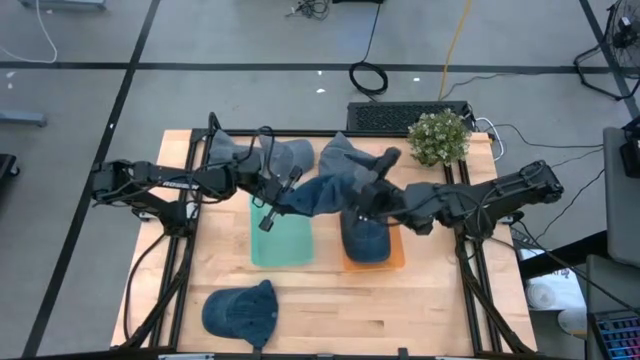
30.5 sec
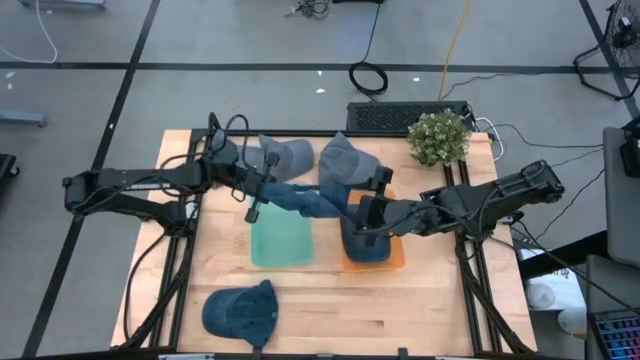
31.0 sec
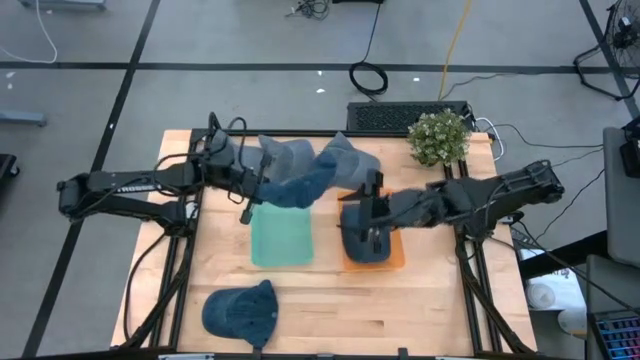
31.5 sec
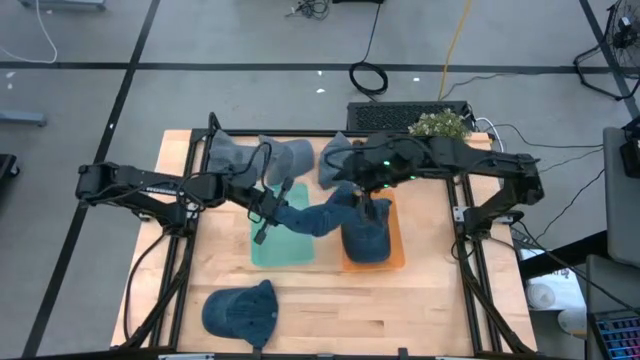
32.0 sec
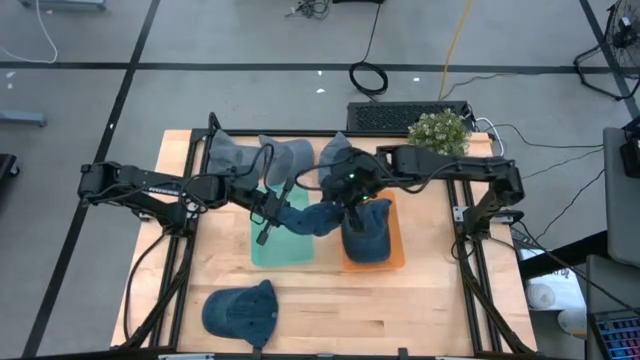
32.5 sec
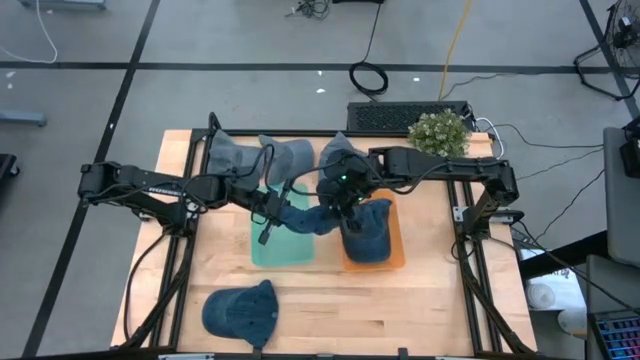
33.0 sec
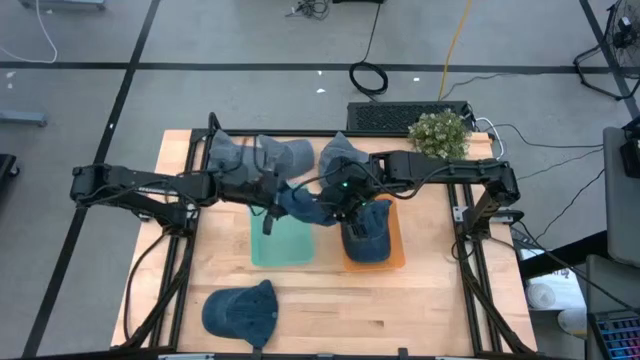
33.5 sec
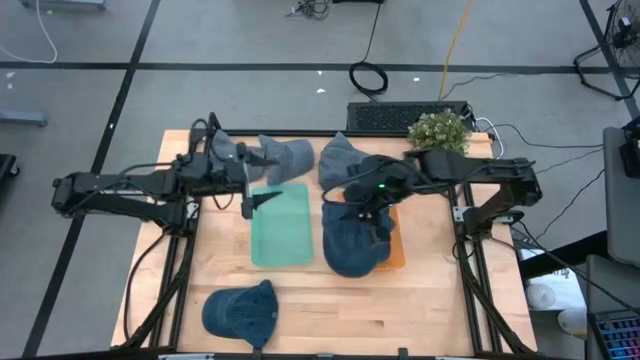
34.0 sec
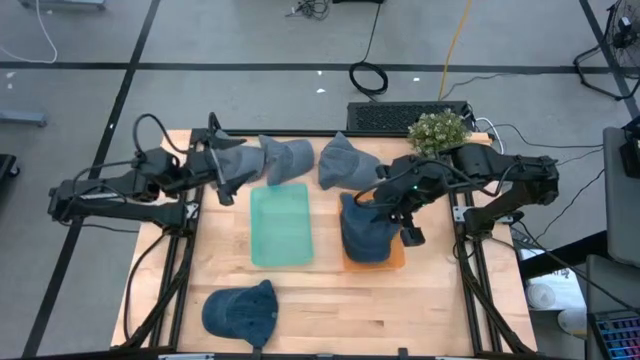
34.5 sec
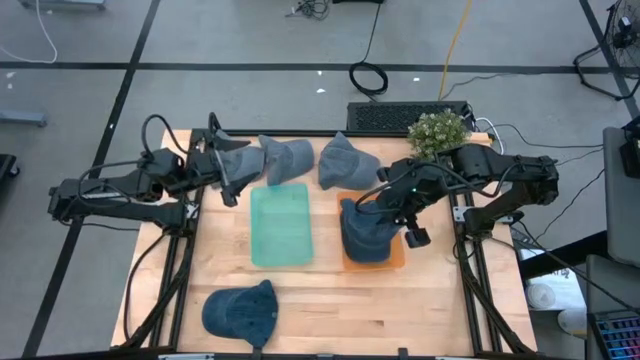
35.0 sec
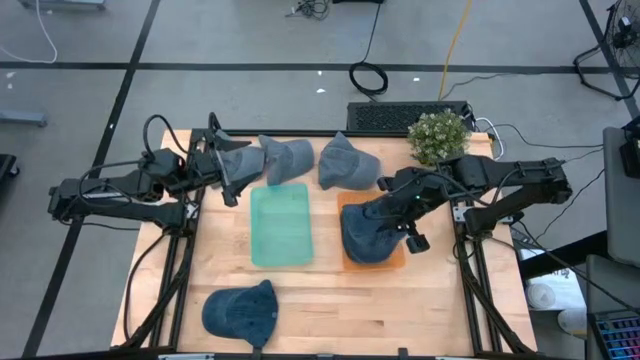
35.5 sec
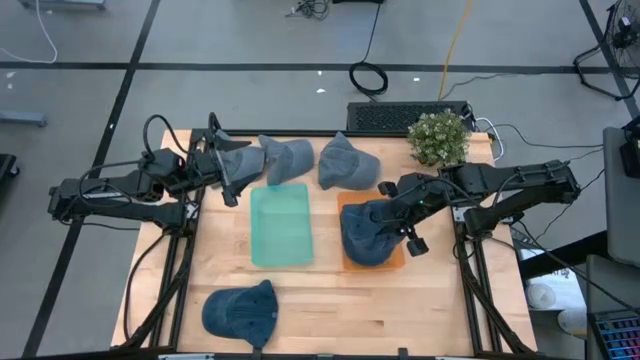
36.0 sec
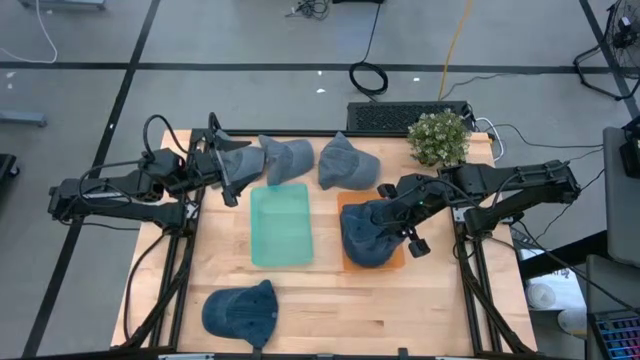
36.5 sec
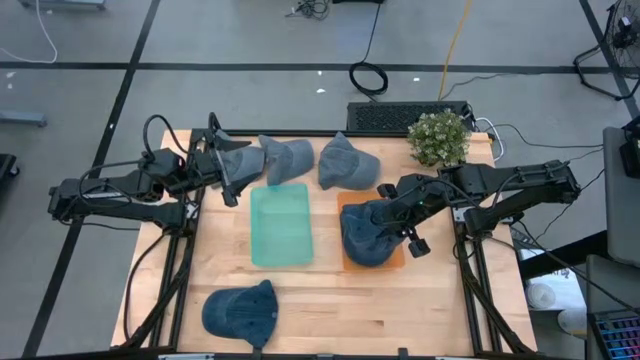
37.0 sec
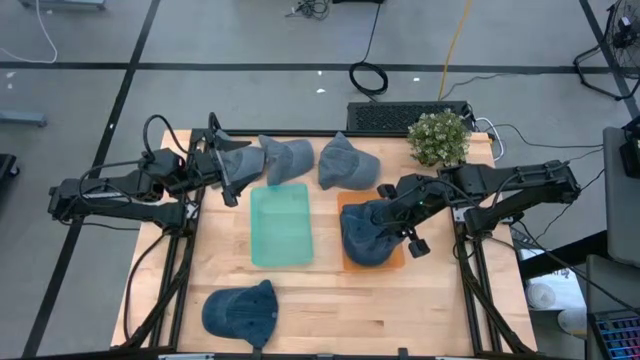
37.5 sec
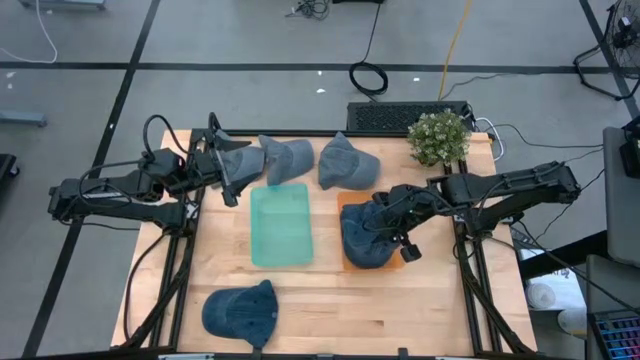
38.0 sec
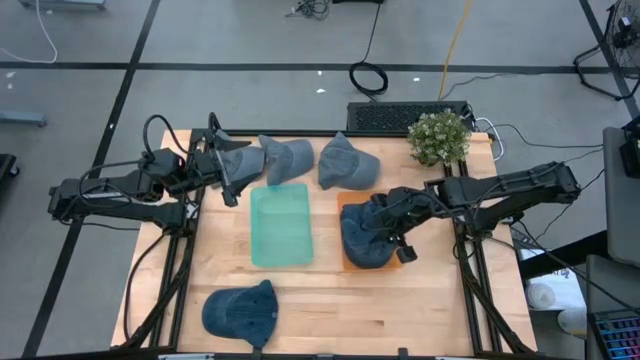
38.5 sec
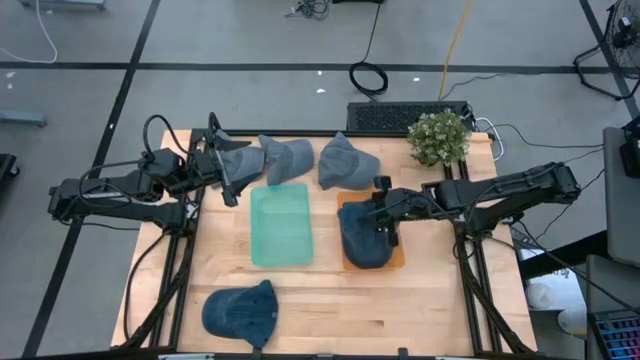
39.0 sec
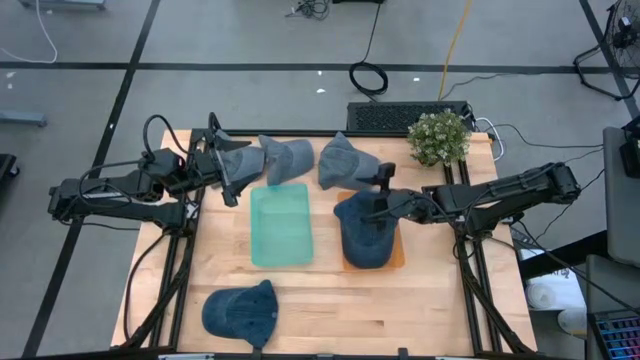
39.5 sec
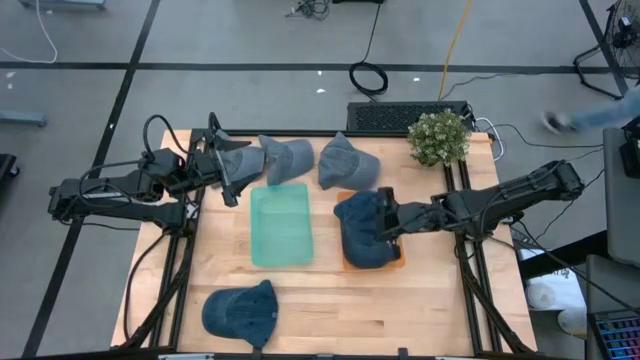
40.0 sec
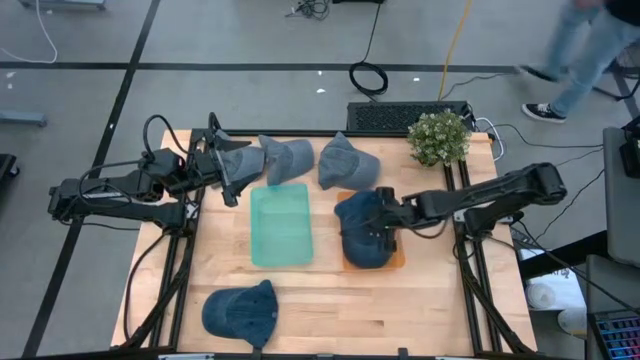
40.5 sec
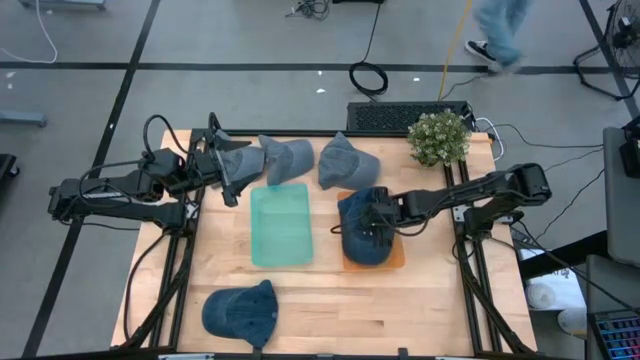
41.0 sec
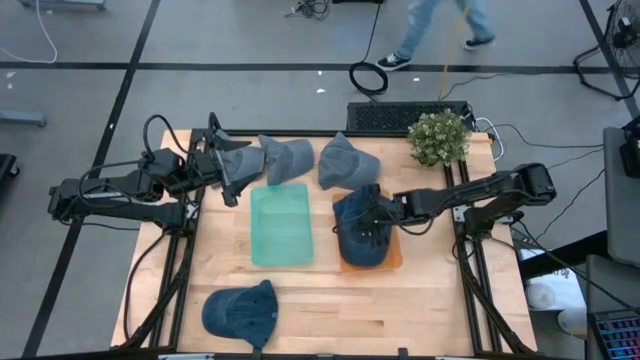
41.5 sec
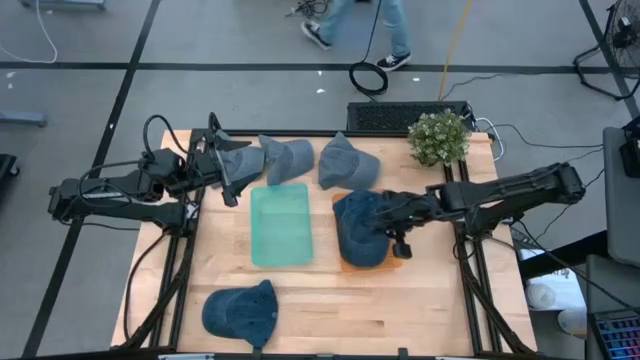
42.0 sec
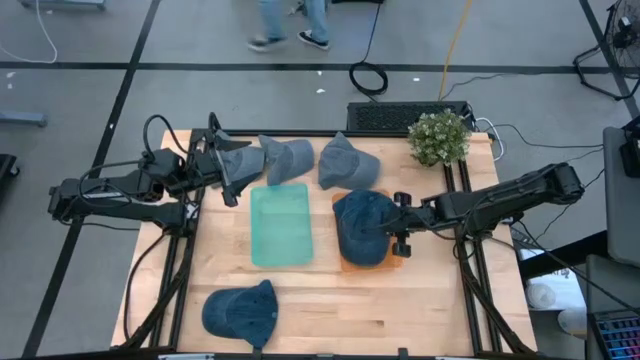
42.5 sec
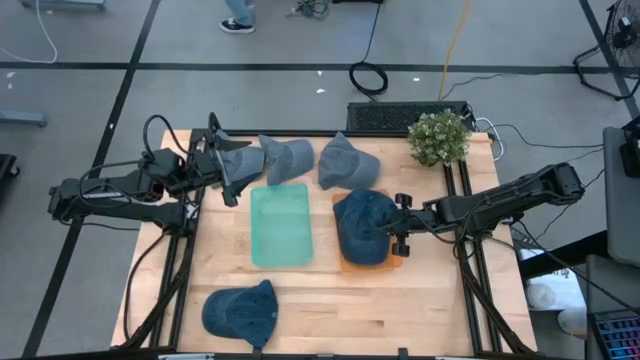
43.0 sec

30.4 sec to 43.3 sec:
Task: Pick & Place hat
Put the right blue cap into the orange bin
